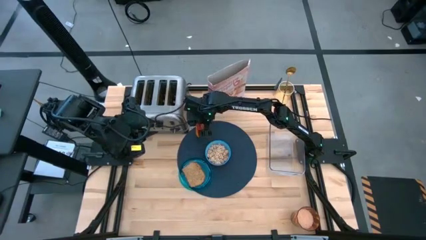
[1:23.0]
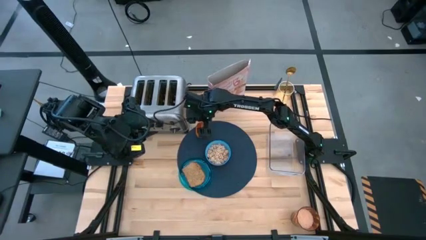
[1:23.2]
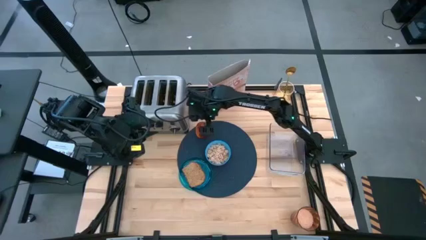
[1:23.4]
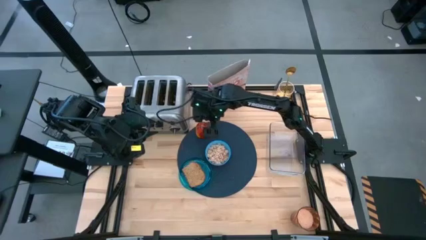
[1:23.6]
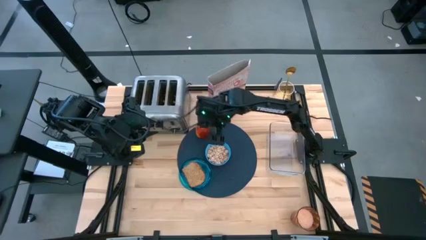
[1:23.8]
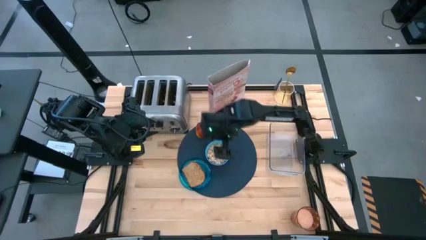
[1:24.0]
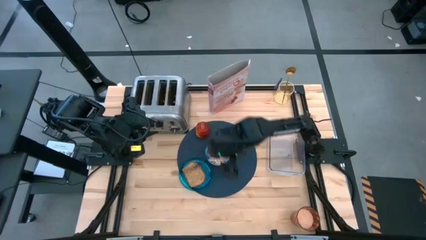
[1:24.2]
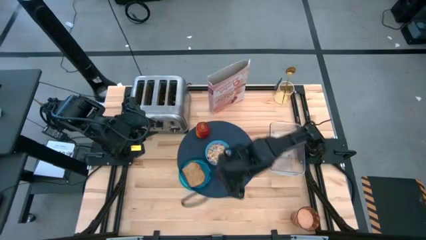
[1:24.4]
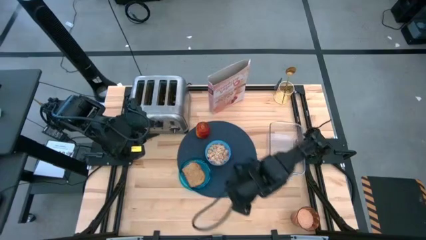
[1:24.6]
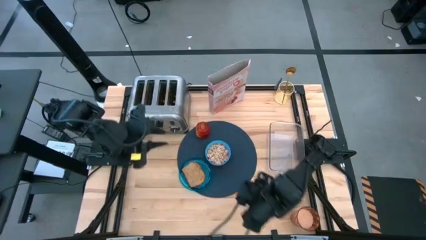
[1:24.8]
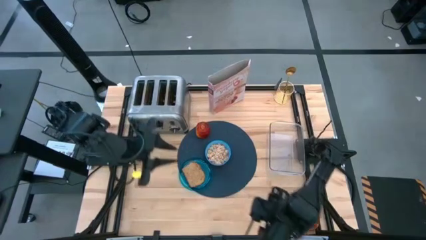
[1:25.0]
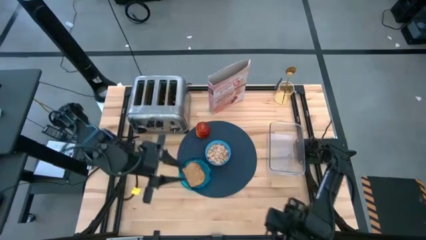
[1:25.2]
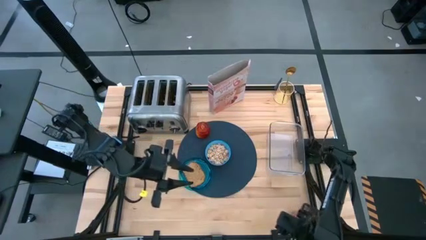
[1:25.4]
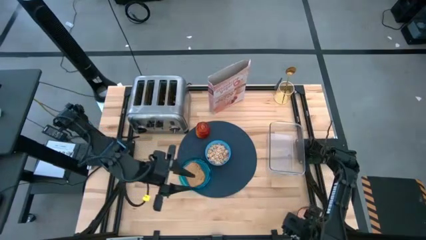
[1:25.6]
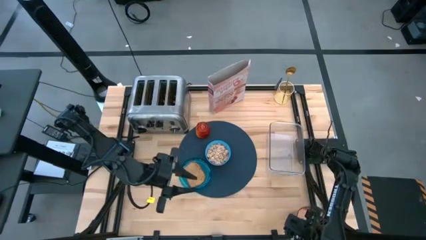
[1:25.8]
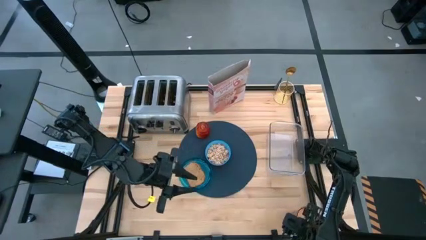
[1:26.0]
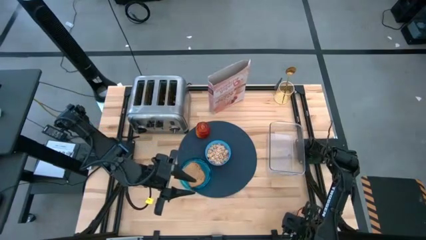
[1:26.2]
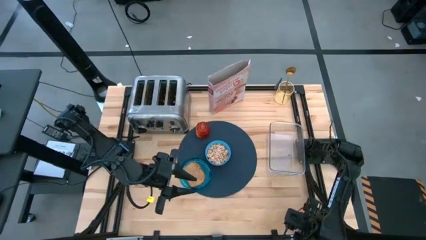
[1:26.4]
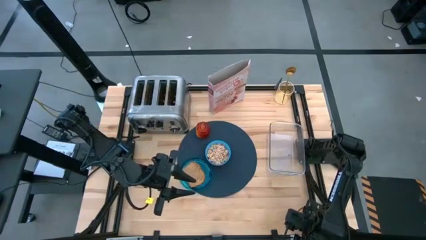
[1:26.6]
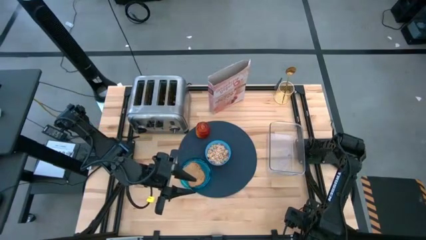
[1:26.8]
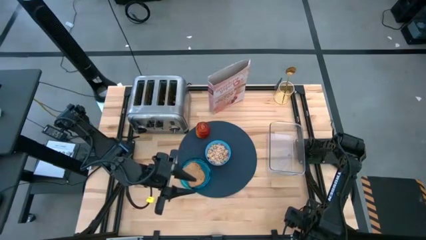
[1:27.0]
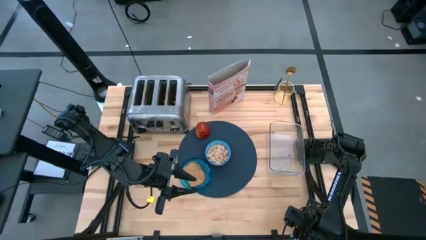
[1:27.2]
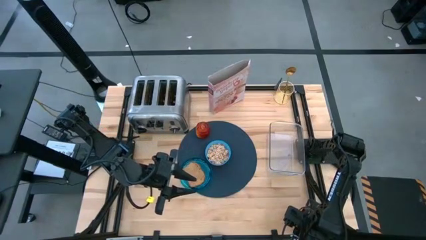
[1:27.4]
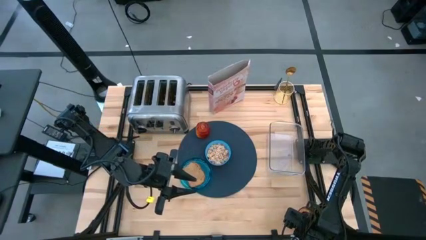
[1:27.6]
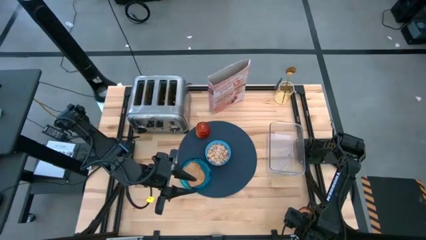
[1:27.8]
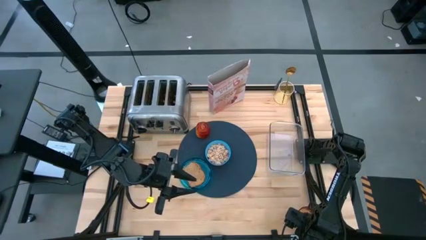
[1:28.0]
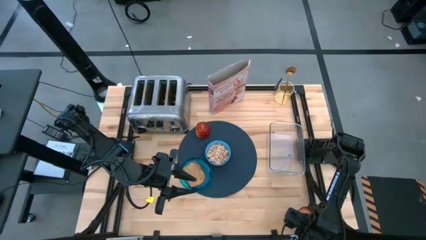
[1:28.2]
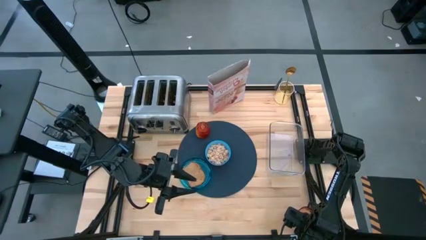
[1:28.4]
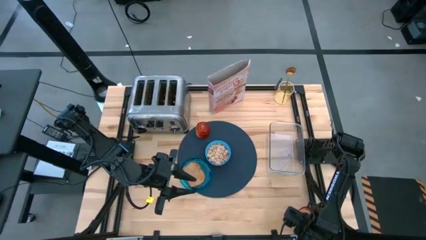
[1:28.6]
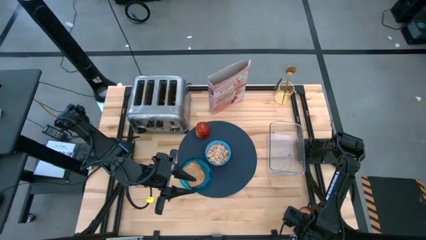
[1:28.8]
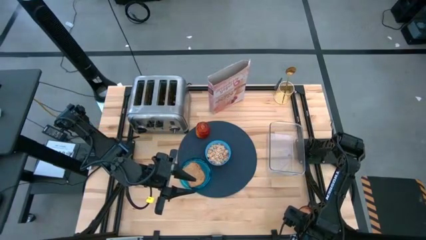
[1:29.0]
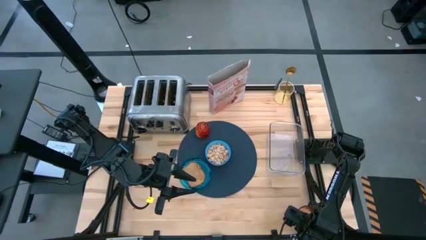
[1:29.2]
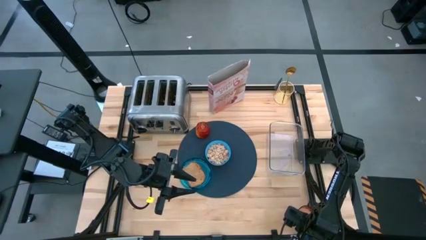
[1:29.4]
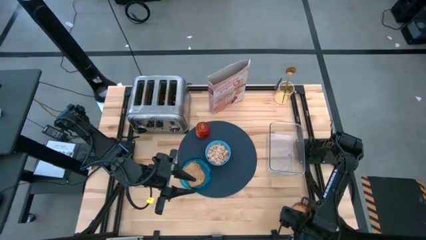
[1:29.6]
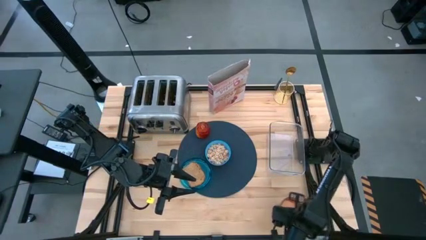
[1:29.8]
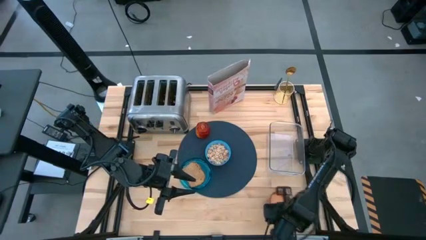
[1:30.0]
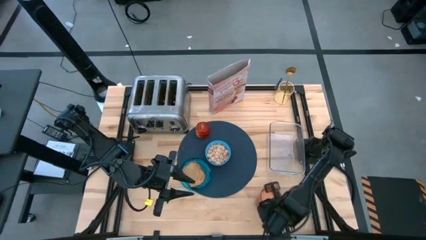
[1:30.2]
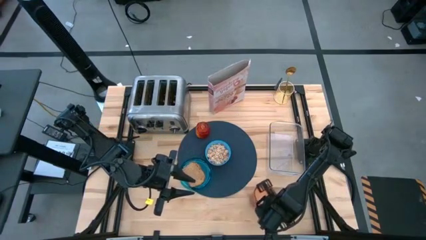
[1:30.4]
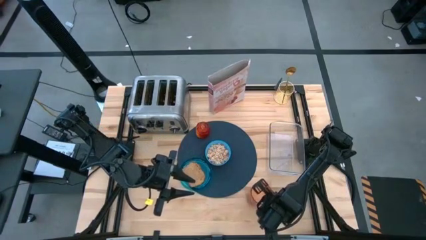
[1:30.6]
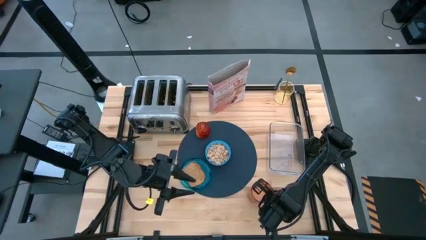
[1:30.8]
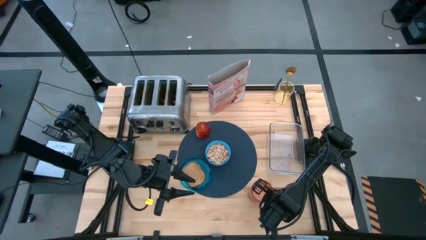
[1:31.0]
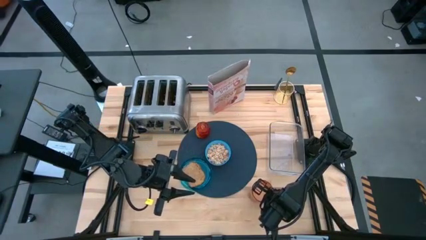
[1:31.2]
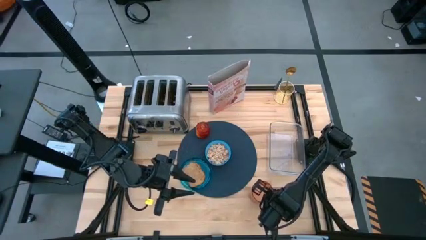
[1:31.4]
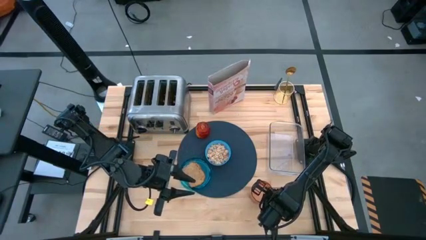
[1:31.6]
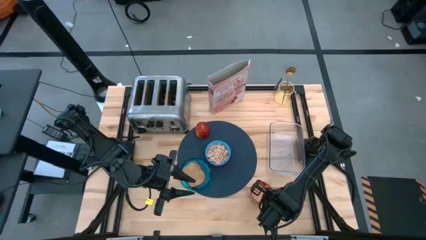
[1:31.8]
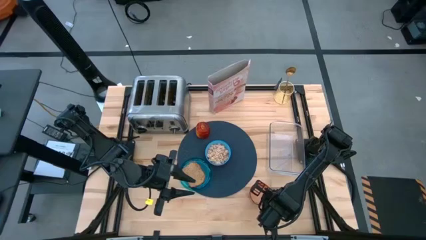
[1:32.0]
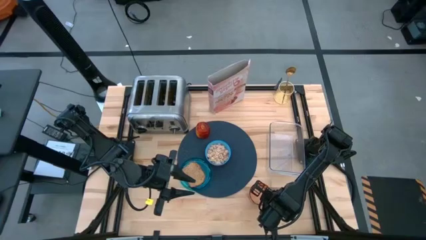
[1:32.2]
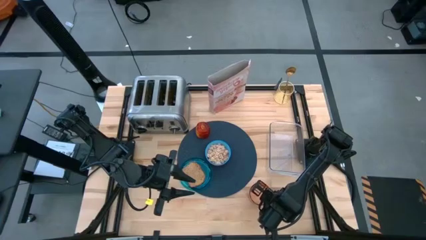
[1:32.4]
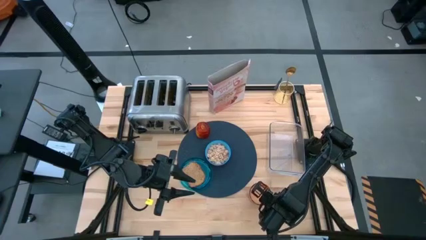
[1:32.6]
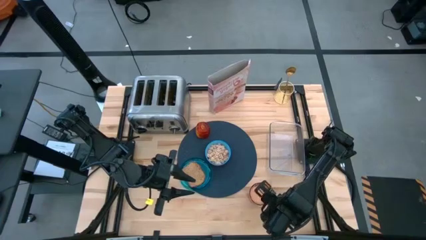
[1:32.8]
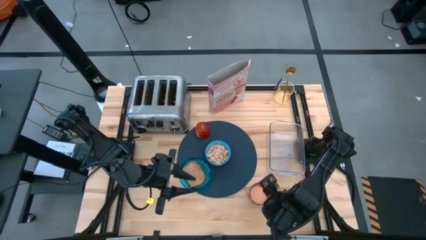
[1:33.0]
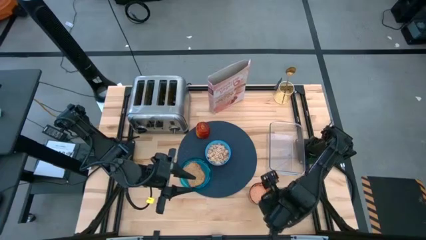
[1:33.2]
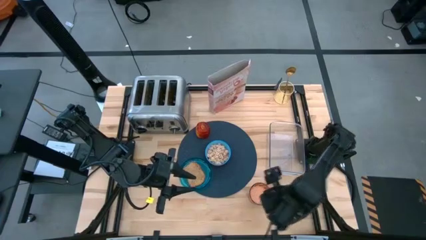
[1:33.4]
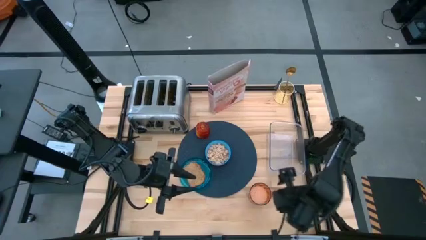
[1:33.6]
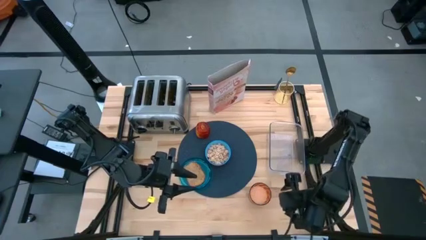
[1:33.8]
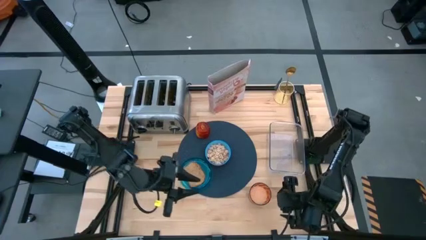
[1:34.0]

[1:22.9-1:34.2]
Task: Arrange a breakfast setting
Put the orange cup on the blue table table mat to the right of the red apple
